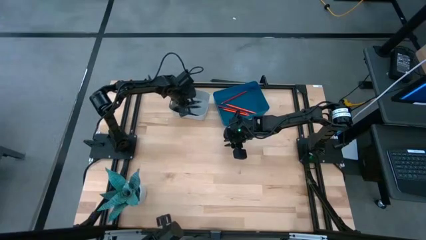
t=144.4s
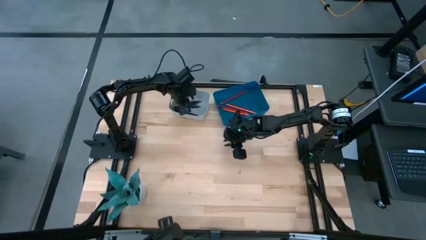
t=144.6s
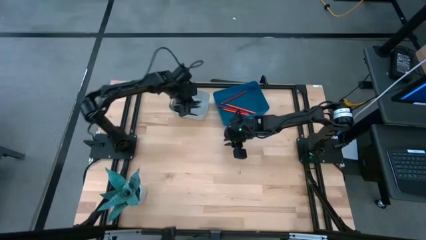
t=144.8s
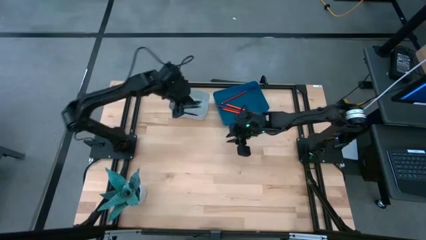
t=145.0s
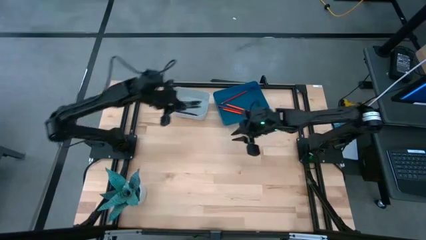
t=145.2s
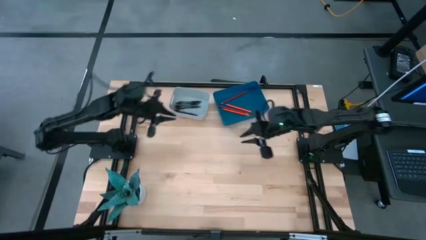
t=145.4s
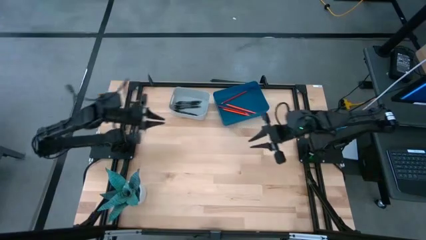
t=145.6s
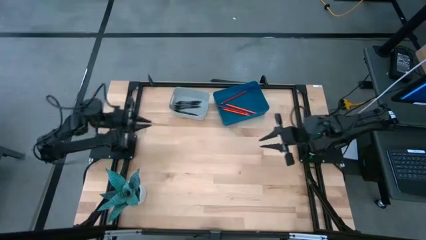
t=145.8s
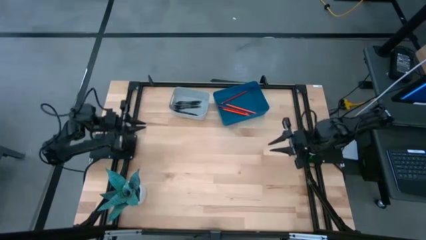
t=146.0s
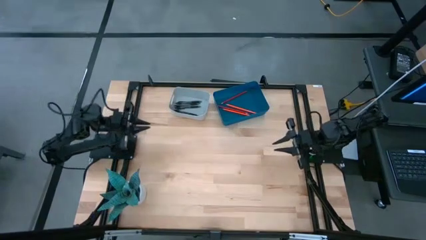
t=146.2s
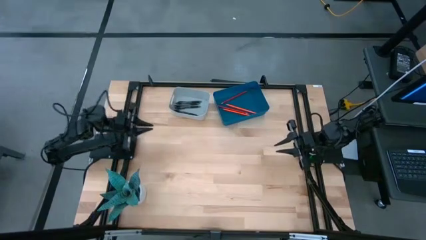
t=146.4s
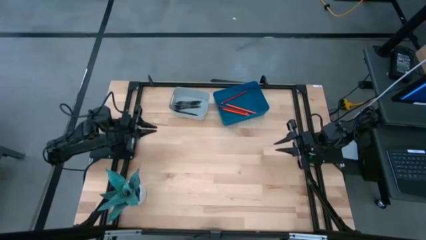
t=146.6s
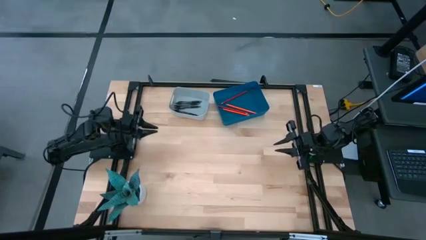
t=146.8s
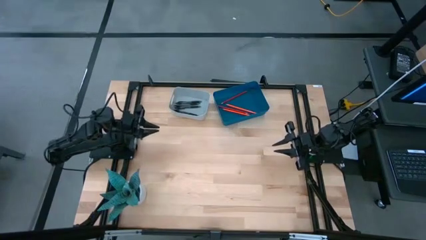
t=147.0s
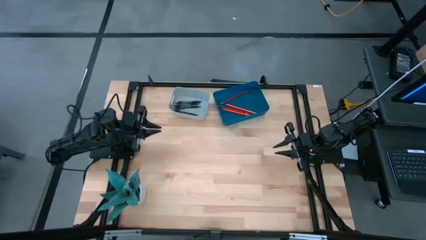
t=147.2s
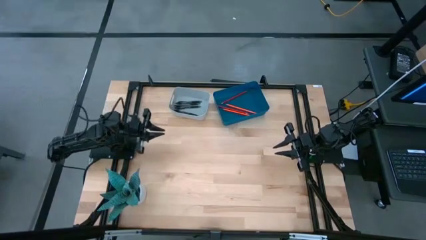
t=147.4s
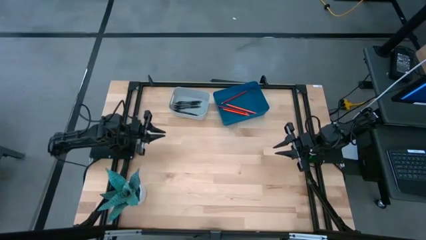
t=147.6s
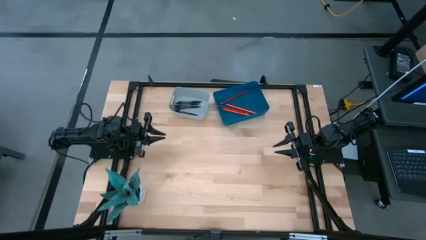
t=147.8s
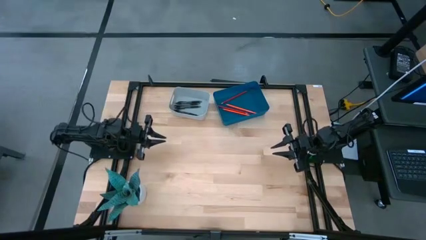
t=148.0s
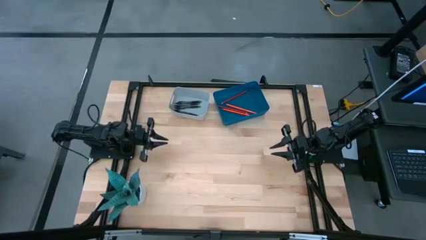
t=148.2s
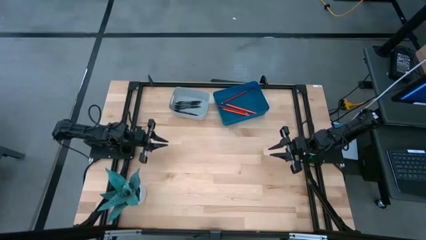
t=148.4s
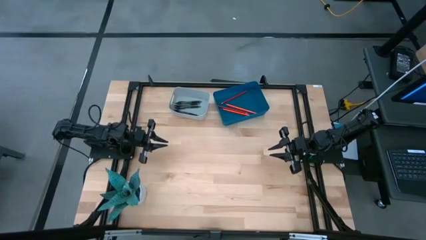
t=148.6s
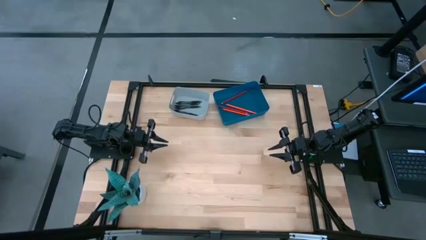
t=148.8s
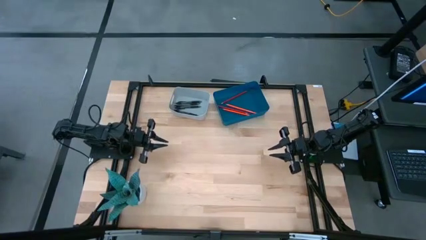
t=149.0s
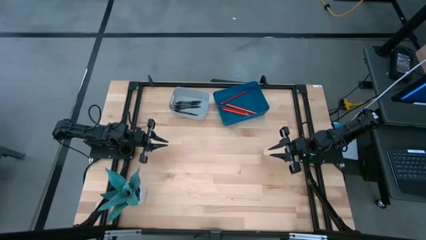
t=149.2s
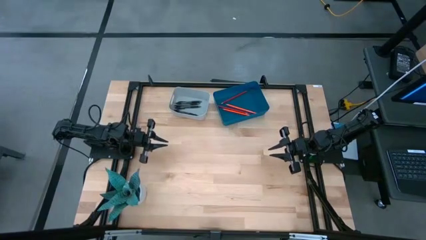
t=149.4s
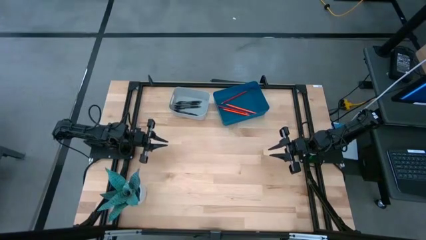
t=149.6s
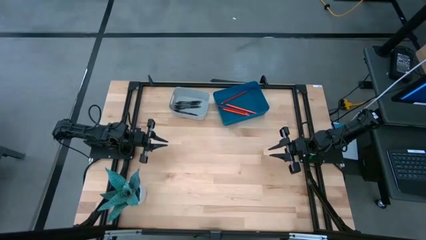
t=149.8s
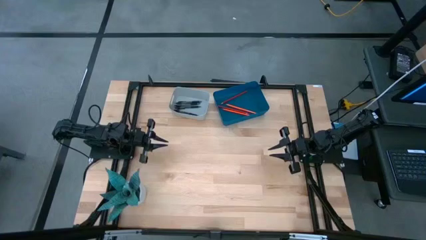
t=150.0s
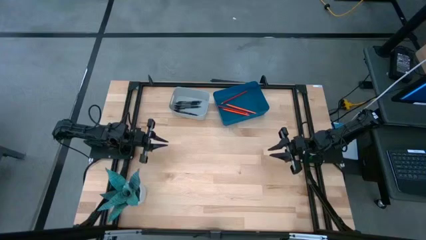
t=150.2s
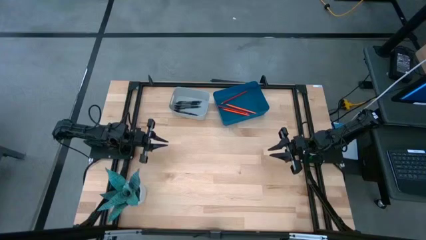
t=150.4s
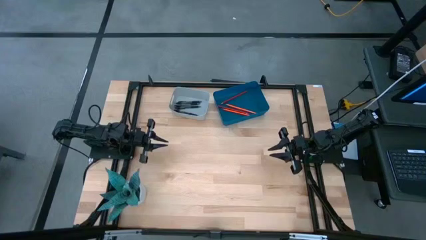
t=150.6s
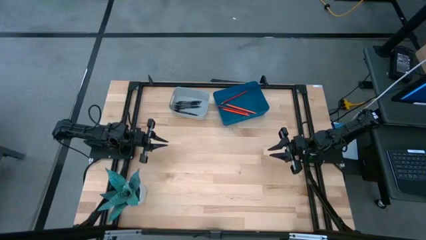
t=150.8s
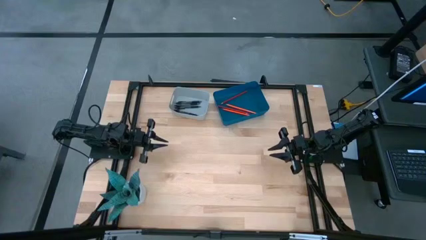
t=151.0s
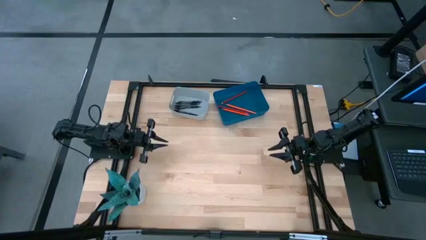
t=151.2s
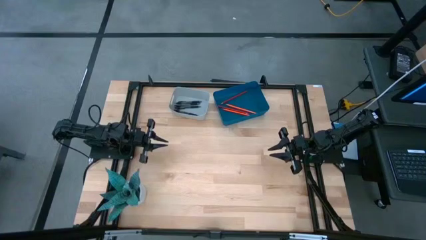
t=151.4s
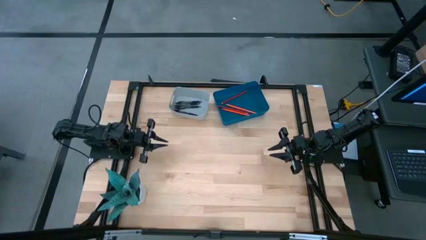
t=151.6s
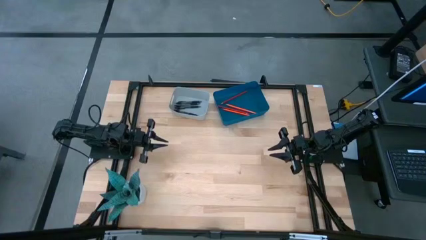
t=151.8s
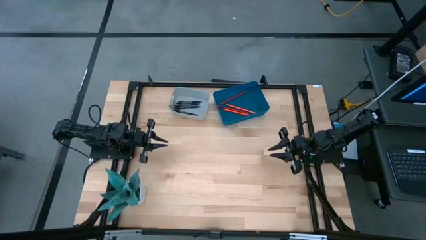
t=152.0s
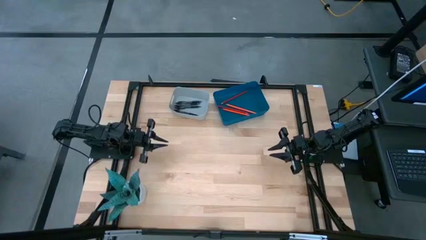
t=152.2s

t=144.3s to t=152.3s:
Task: Sort pens & pencils
Return to Home Position

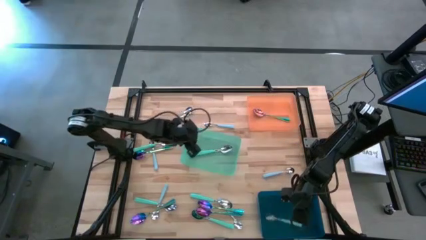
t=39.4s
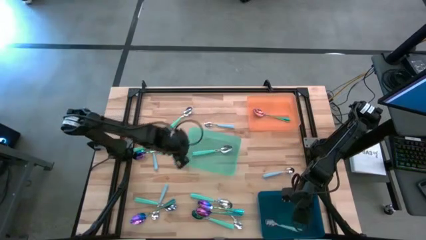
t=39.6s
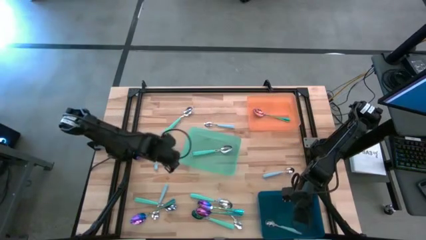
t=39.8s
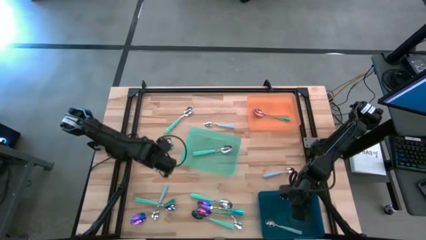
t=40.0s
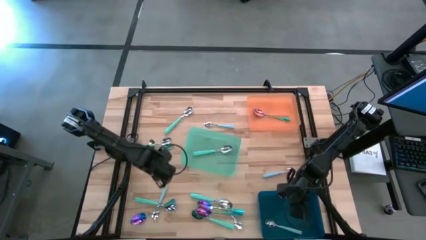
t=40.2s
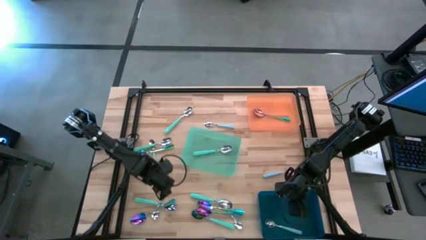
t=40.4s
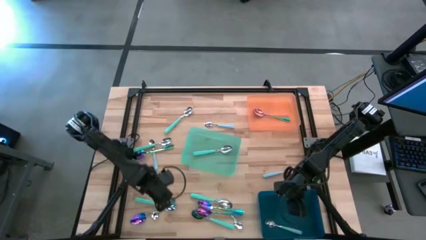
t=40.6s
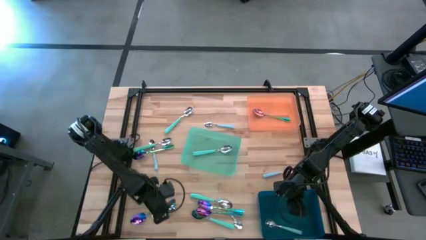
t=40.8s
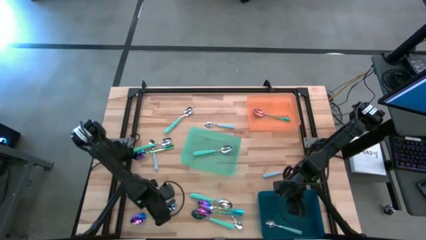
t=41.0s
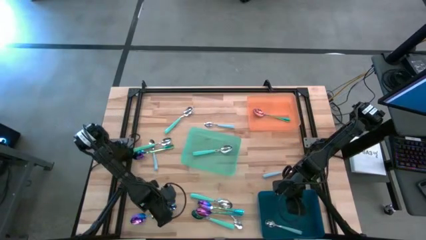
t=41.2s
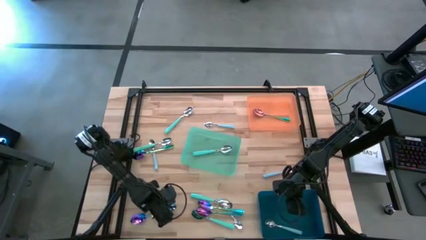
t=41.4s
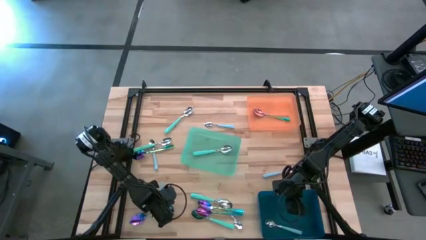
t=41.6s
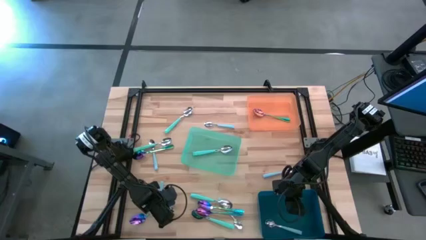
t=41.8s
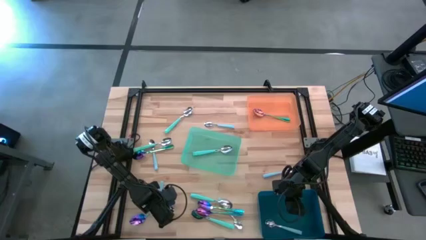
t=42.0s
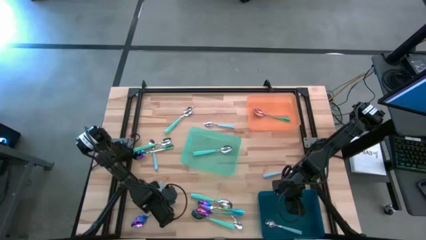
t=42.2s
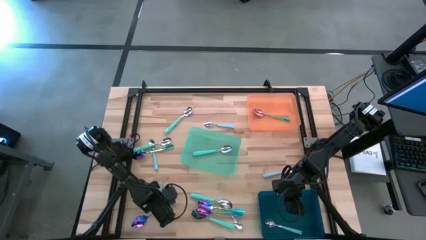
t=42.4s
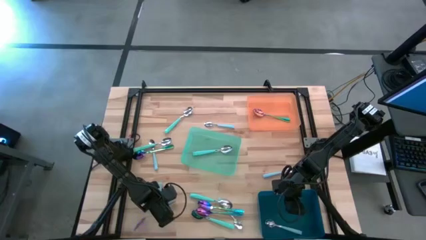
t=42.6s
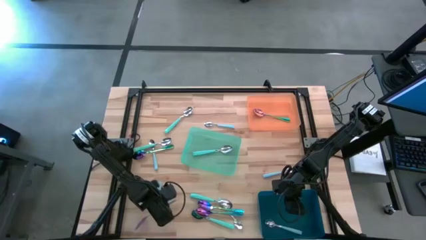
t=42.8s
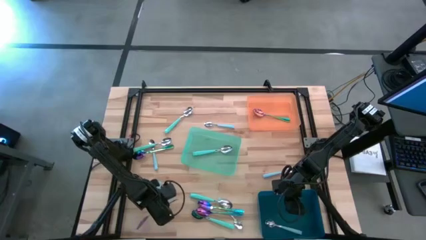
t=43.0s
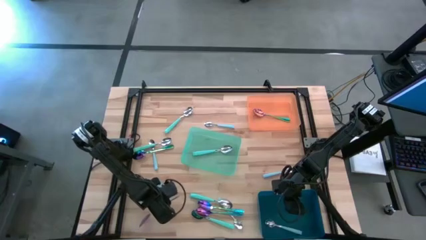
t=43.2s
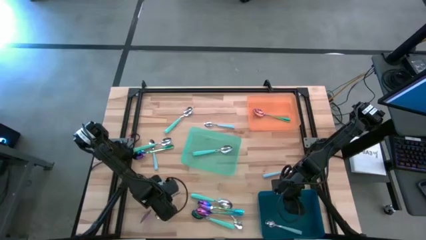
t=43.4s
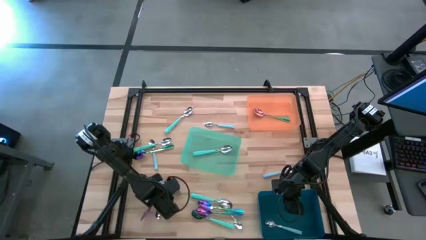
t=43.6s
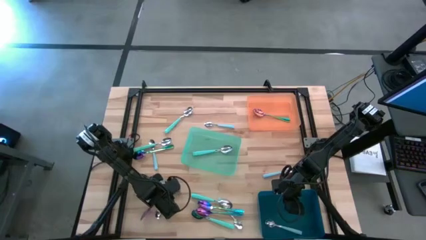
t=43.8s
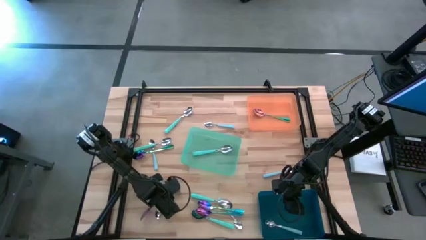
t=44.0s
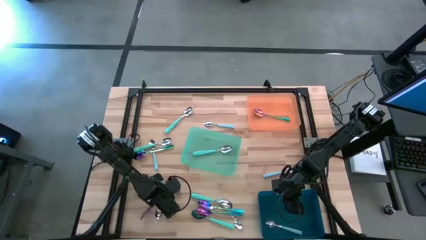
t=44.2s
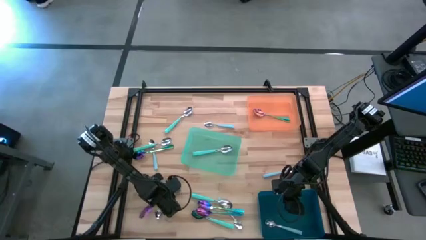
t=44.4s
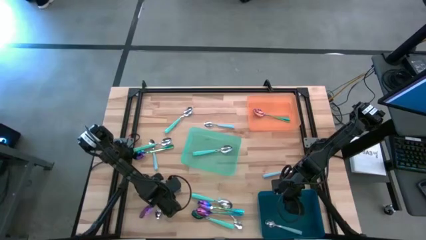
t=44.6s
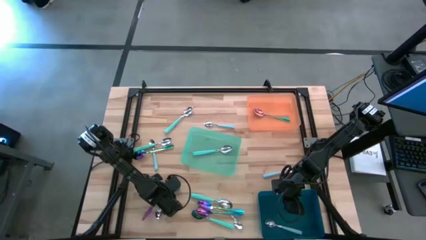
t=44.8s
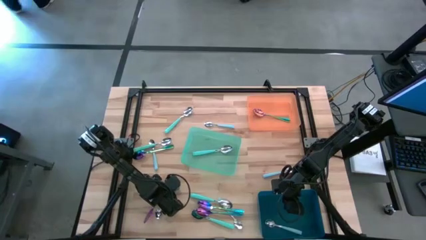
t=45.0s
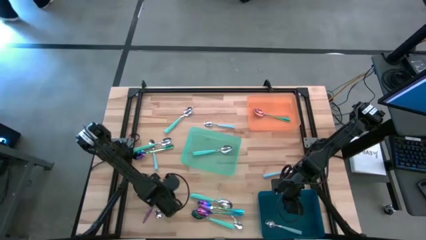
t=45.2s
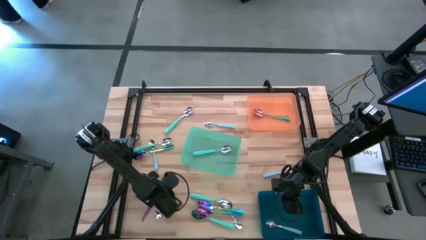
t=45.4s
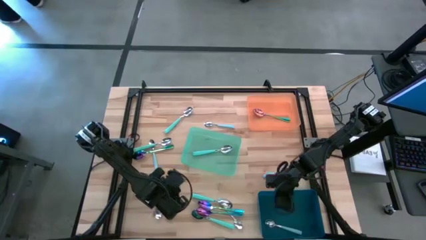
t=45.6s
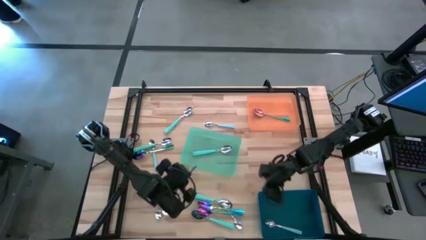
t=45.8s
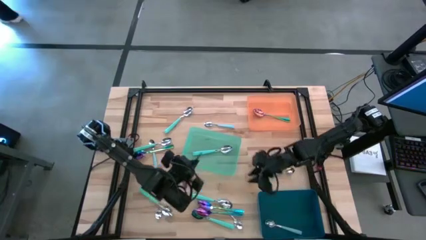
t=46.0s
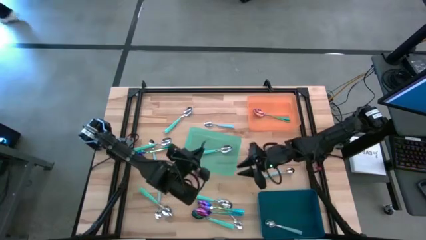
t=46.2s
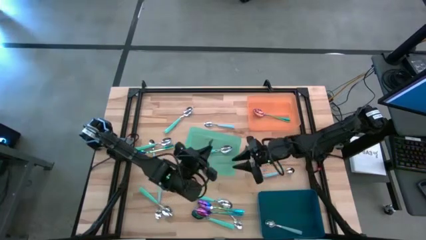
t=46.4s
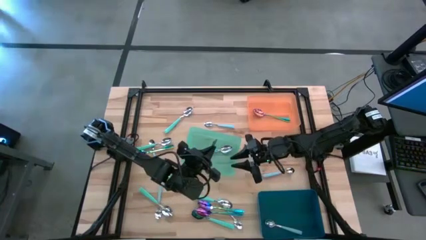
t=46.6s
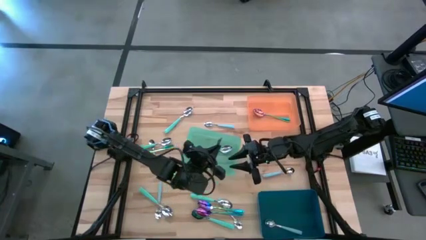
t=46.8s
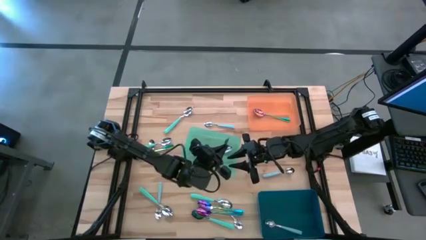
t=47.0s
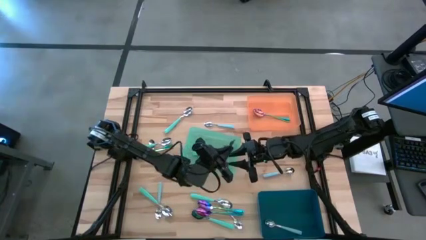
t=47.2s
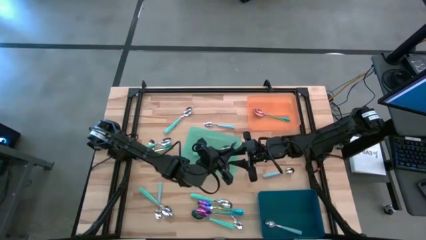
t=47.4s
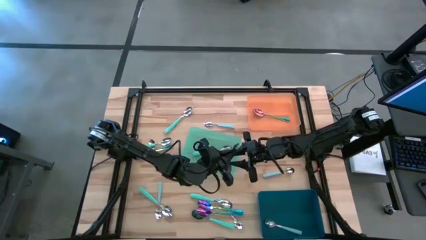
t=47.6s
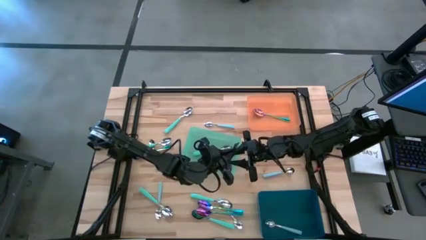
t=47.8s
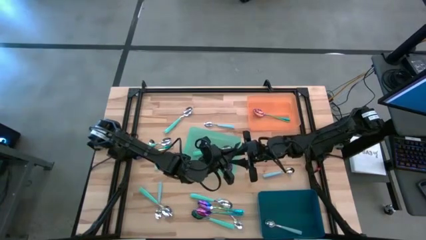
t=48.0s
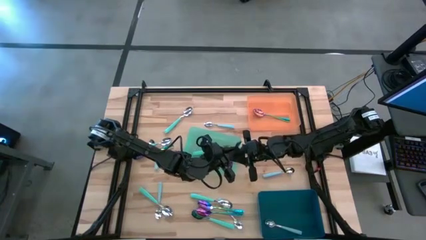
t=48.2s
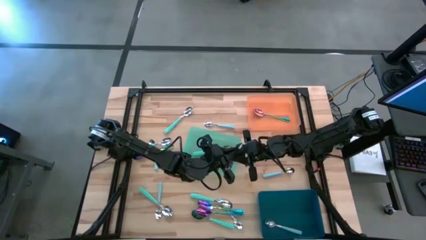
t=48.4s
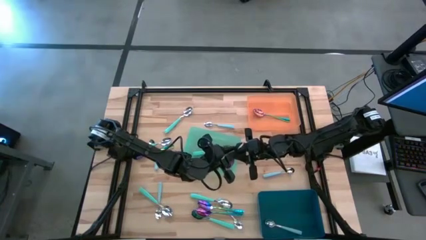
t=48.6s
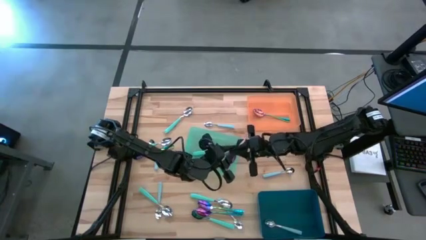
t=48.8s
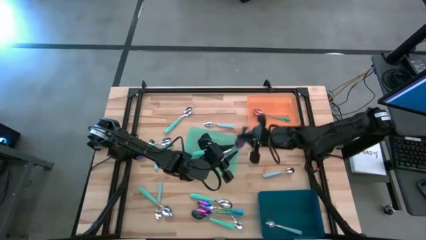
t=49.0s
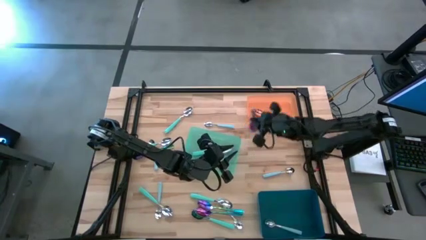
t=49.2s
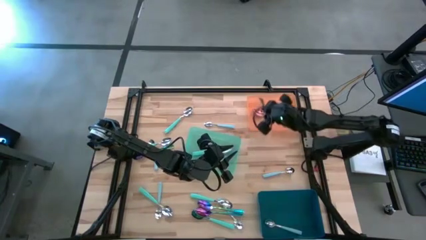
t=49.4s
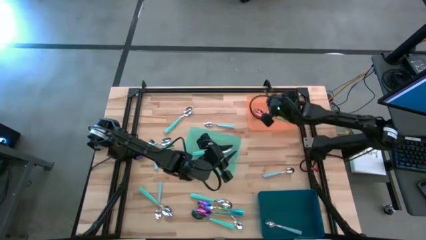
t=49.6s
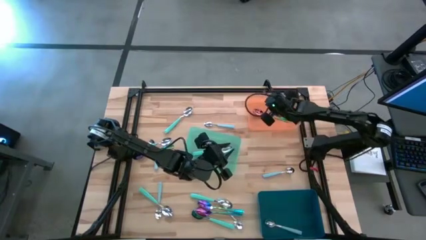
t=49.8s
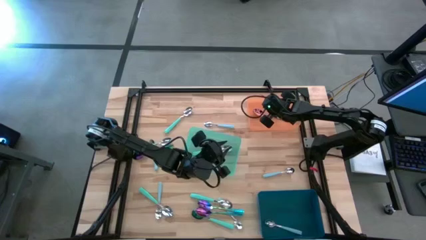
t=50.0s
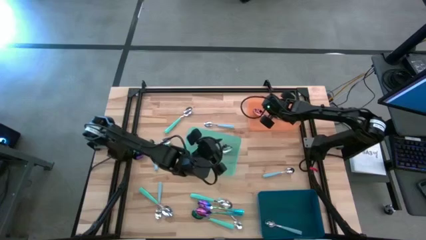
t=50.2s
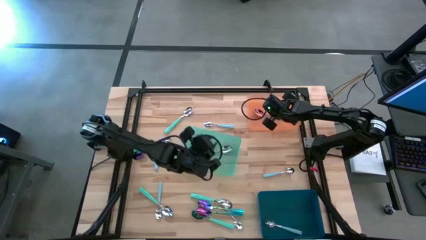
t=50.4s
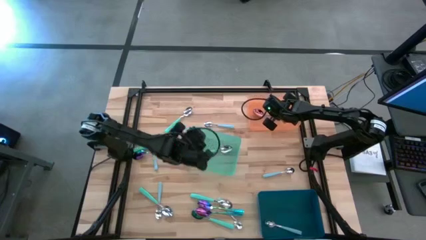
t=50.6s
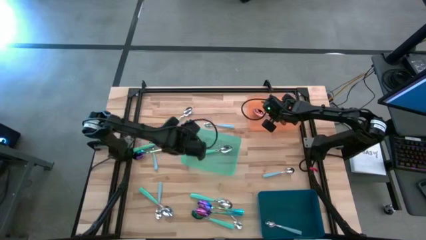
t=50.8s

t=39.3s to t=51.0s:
Task: Sort silverware by color (type)
Put the violet spoon into the orange bin
